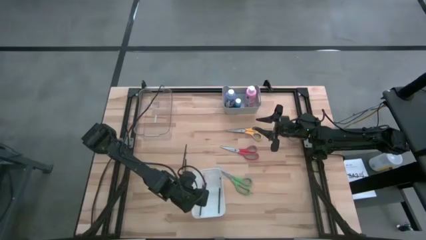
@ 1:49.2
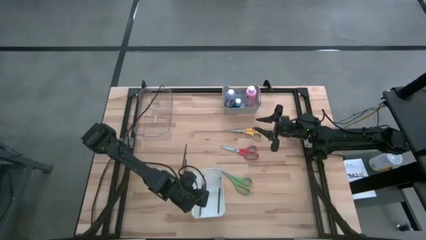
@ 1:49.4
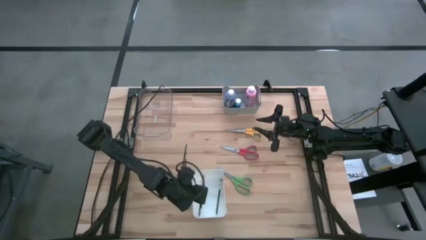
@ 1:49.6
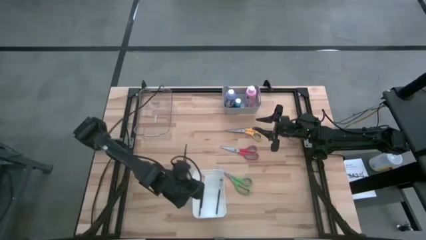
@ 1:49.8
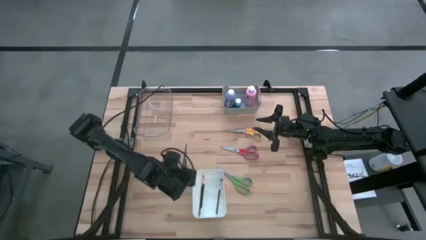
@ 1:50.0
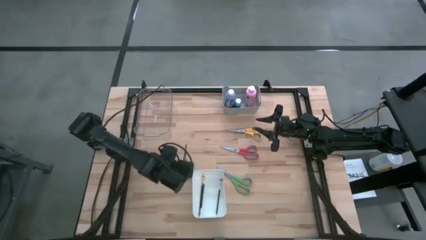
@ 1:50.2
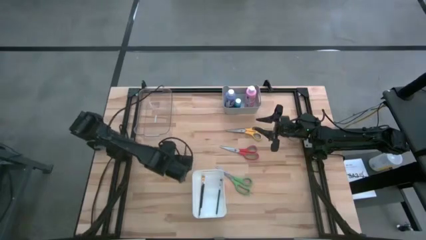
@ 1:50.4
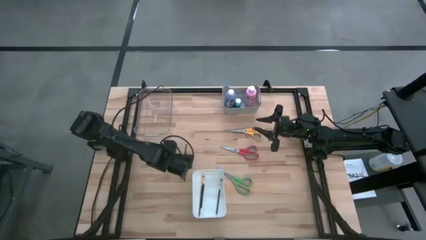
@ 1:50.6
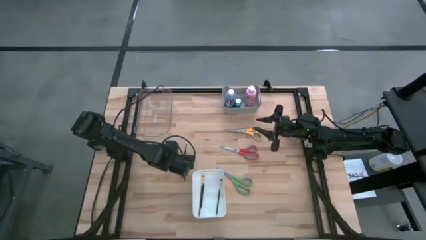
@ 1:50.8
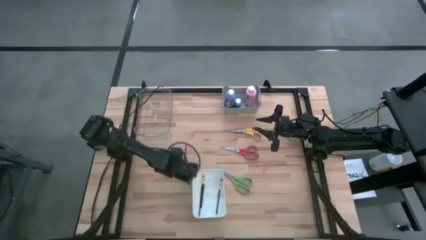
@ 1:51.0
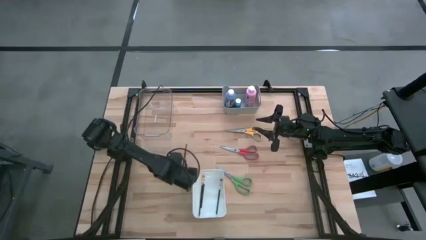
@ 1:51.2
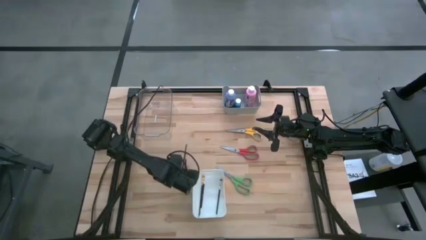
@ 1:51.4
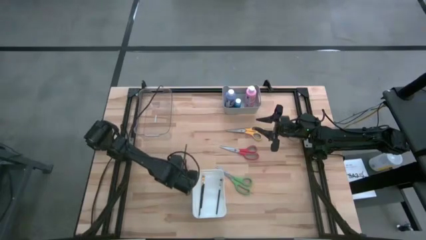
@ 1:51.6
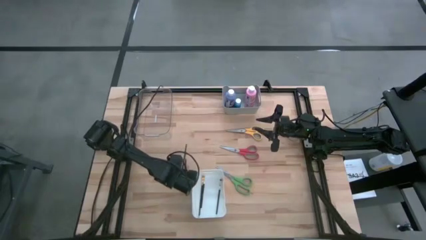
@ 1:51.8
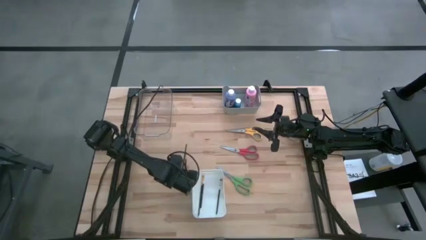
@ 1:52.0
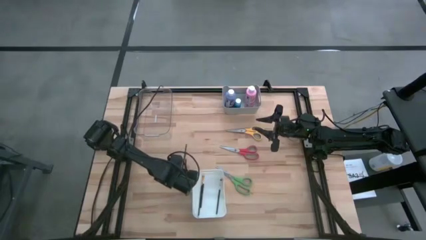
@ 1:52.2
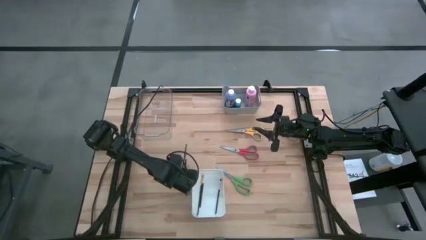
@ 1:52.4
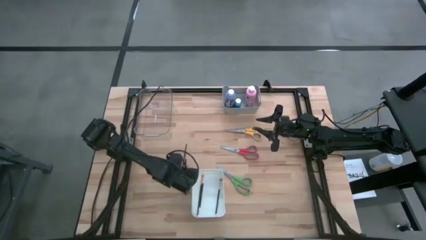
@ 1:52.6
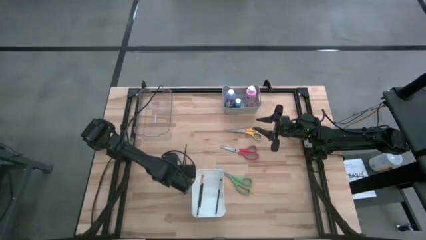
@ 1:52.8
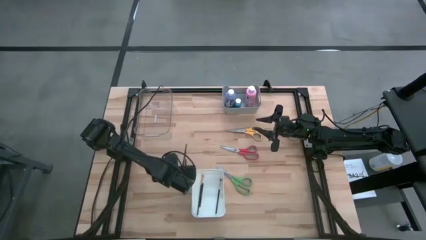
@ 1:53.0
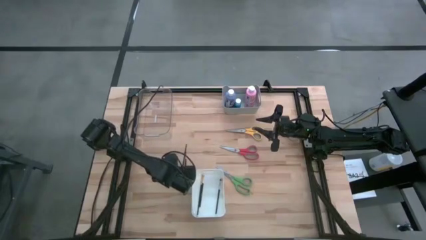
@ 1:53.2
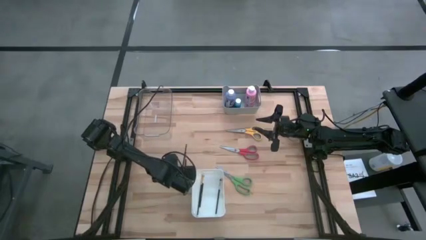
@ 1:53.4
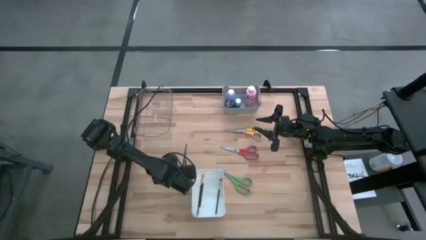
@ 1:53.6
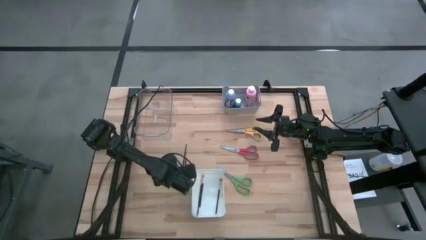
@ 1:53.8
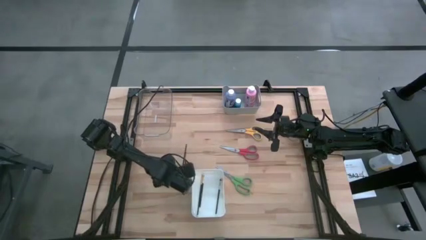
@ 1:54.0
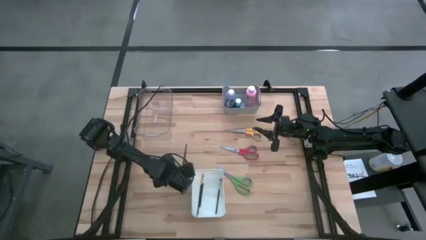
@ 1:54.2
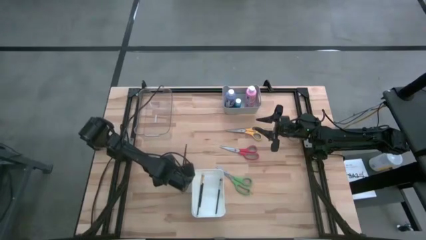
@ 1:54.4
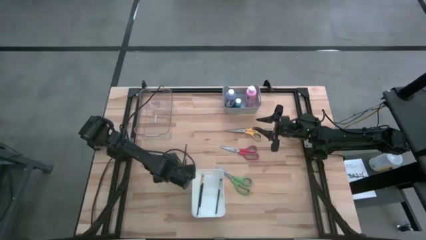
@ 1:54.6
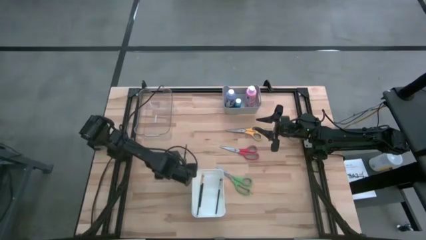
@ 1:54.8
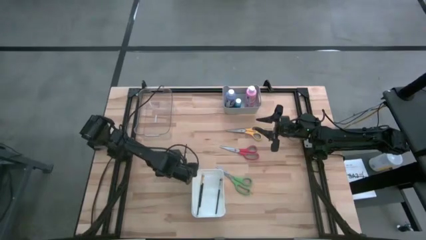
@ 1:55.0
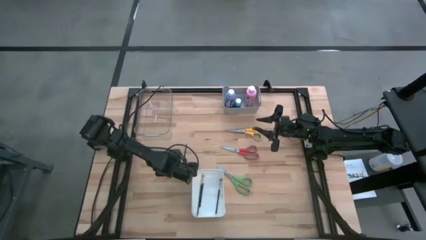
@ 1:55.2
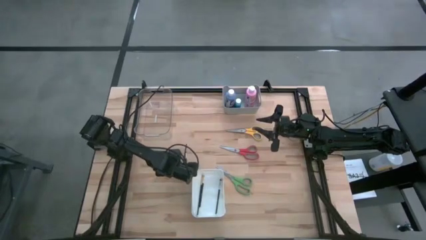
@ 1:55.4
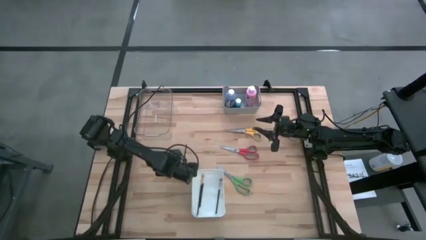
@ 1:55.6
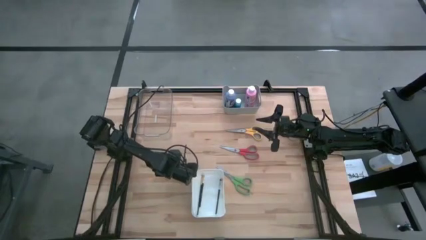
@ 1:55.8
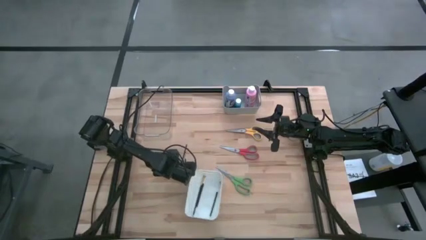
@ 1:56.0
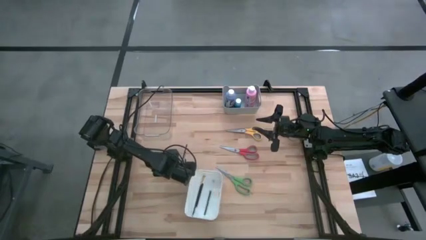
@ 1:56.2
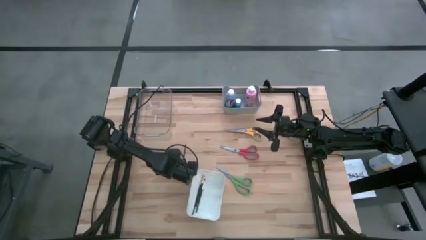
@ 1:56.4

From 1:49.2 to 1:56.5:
Task: Pick & Place Paint Supplies
Put the gold paint brush into the white bin

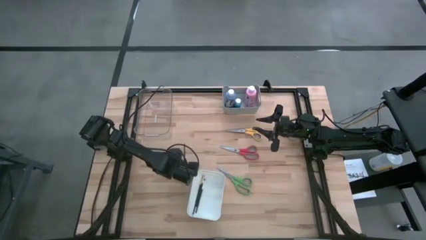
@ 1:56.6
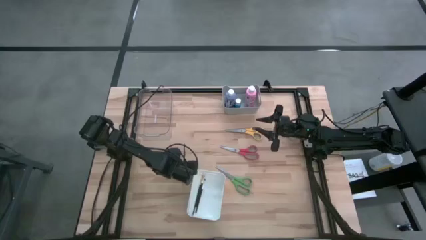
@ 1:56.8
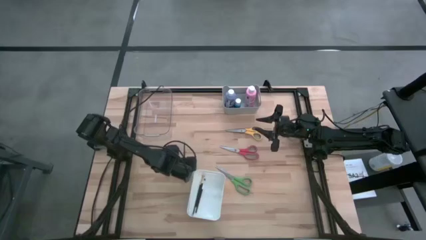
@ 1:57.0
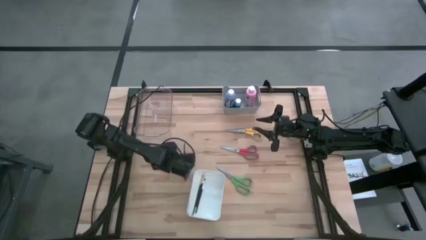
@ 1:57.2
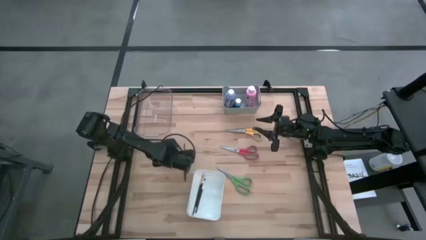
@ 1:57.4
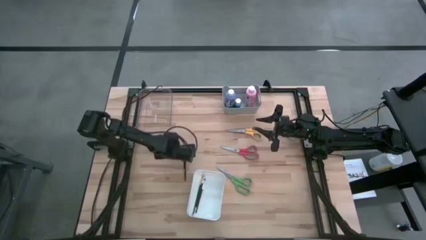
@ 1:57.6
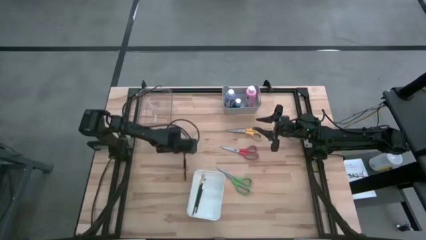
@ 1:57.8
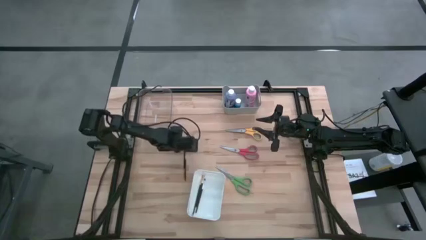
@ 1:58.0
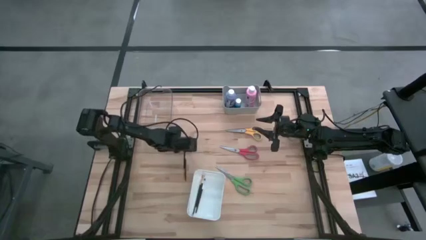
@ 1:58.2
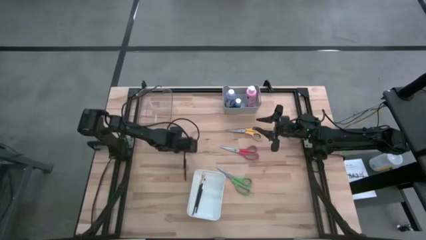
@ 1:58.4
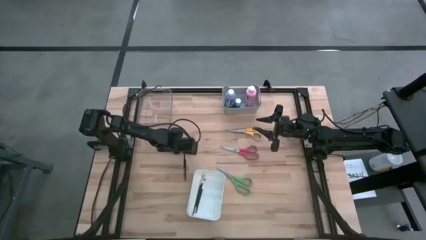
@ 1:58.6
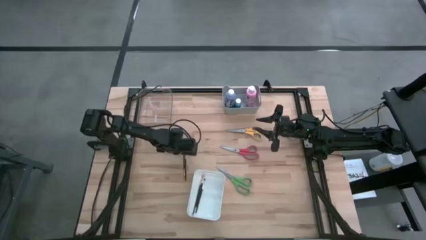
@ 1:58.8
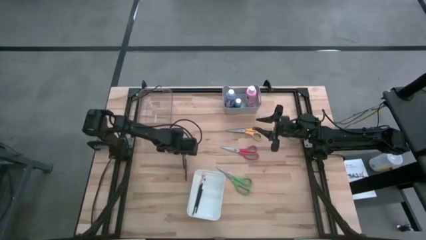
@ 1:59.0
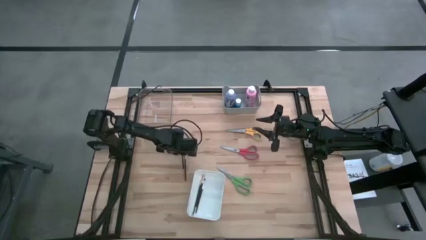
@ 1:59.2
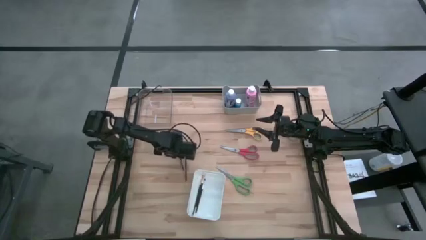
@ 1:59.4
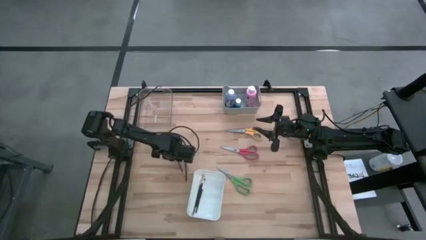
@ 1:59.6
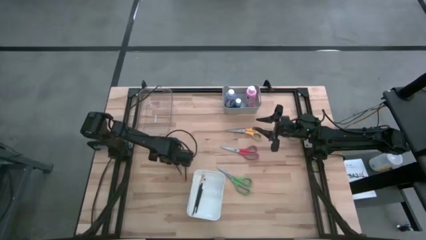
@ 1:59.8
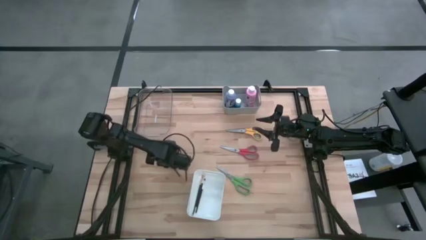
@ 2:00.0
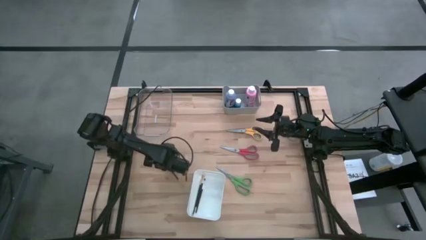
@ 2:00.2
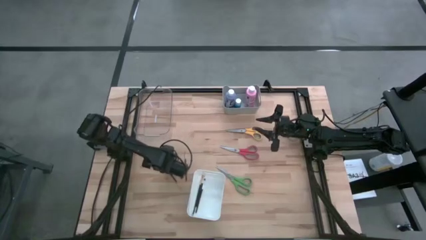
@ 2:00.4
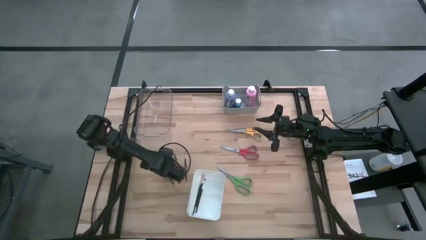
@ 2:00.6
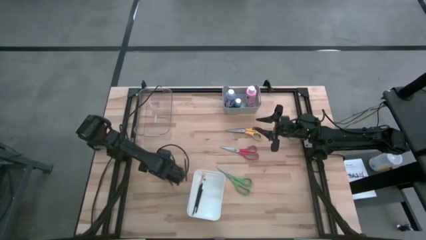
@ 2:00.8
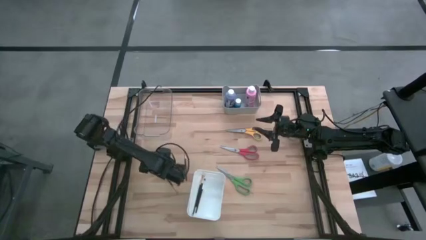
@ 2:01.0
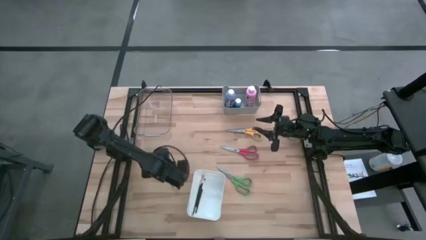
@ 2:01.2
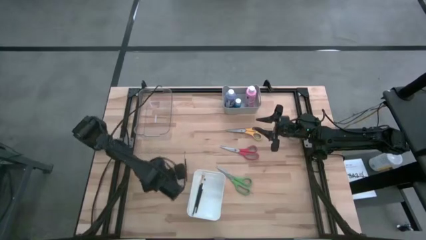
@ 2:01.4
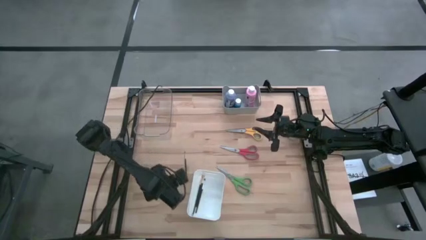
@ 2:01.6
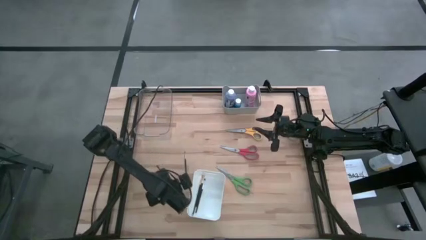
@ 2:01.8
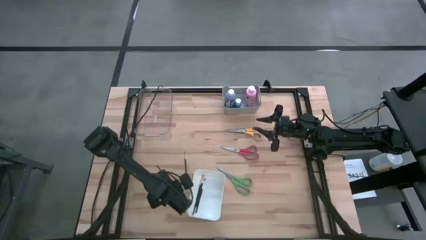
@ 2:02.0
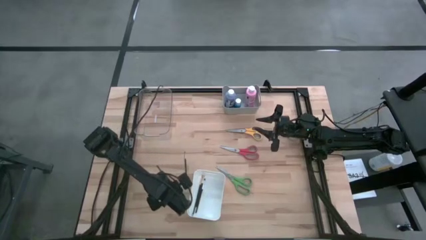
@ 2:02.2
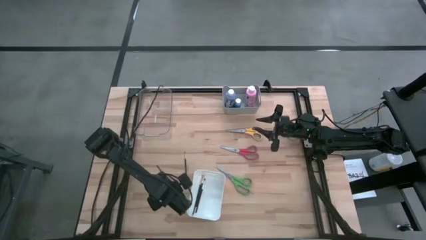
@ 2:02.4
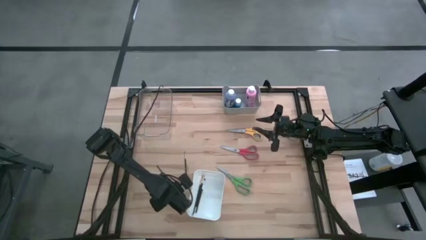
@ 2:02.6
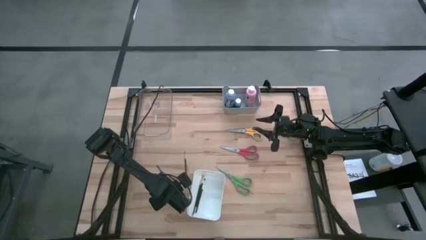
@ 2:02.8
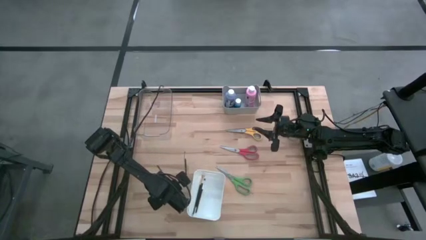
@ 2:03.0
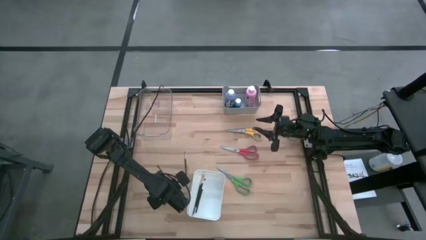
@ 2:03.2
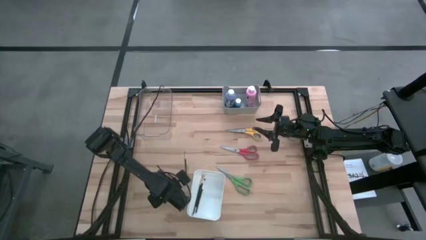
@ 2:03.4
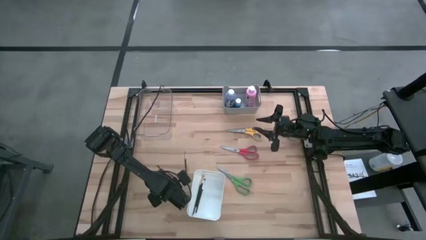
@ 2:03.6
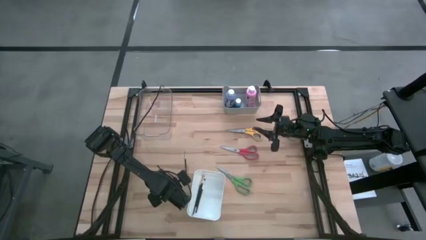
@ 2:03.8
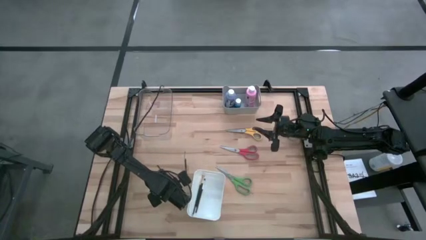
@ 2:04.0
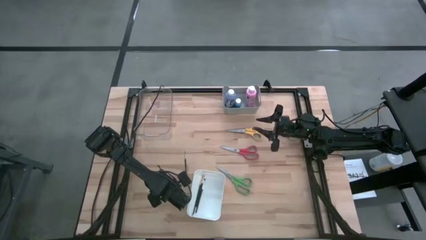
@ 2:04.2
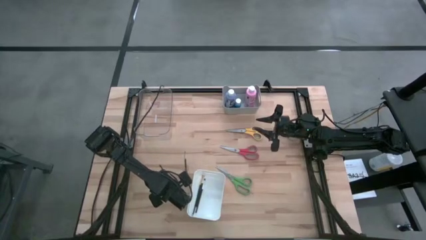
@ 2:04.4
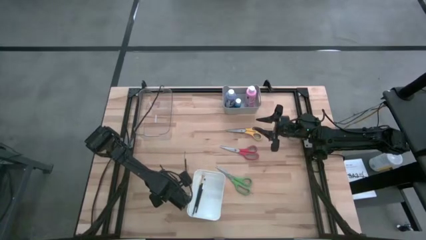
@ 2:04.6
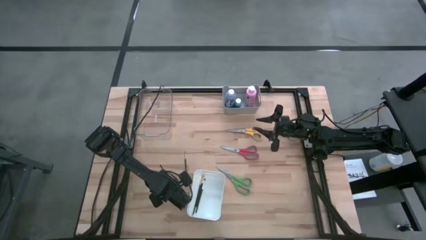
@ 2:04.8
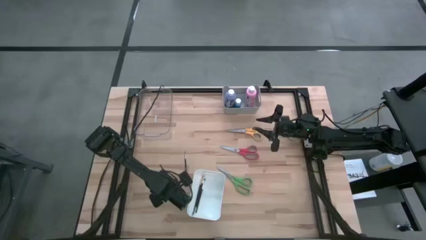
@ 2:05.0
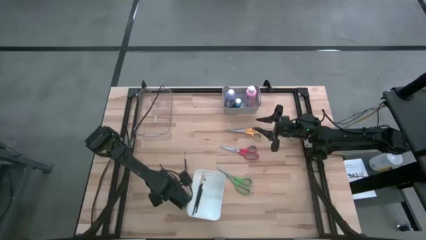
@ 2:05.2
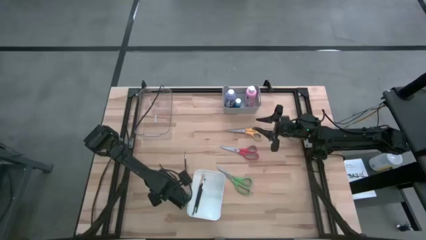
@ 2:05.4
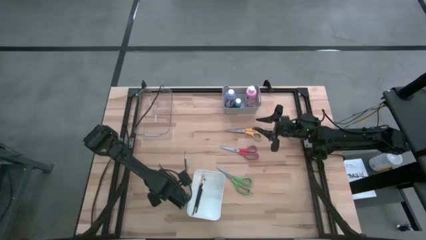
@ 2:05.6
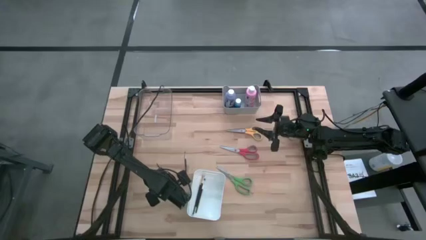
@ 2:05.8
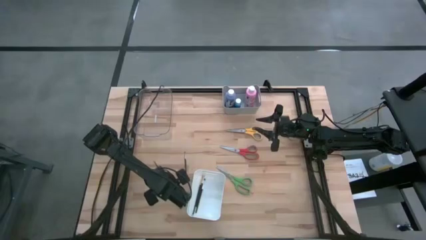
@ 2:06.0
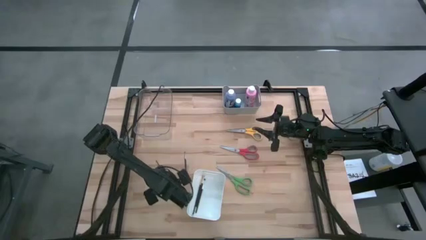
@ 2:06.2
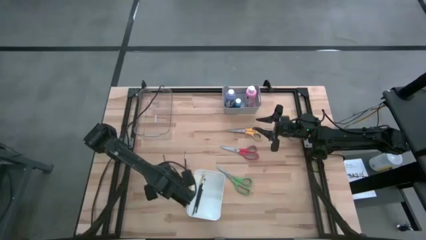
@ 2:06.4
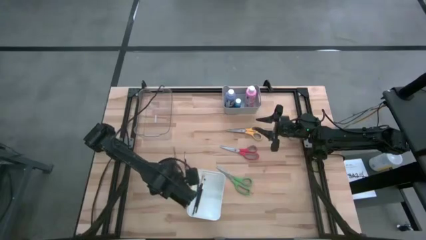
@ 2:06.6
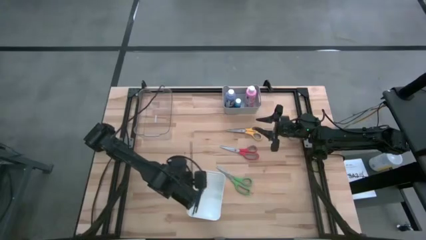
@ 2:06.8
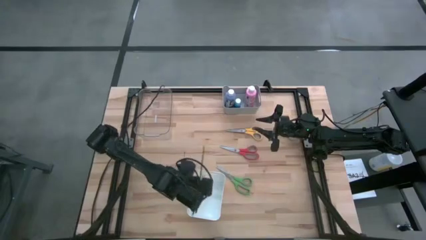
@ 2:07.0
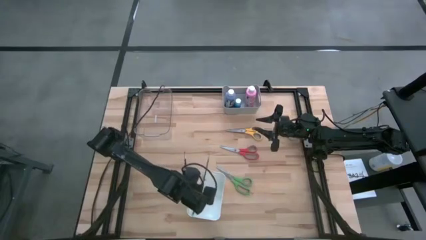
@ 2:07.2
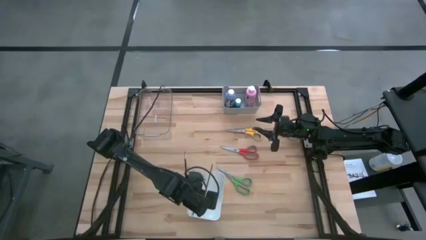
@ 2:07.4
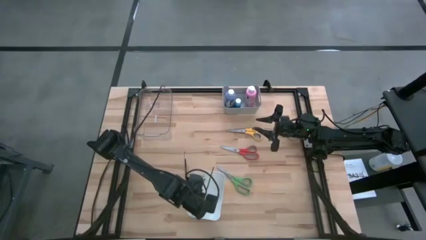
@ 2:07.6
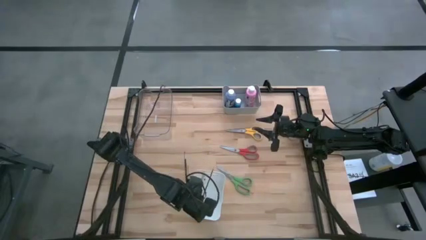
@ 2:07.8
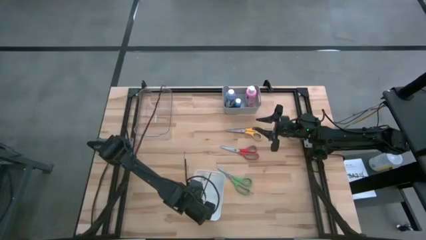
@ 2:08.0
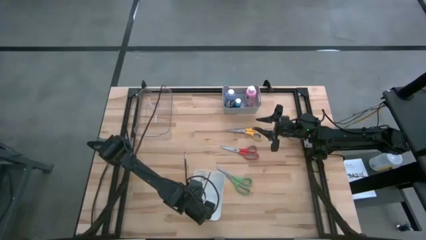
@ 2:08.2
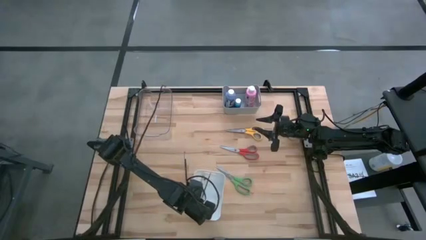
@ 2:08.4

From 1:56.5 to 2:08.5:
Put the gold paint brush into the white bin
